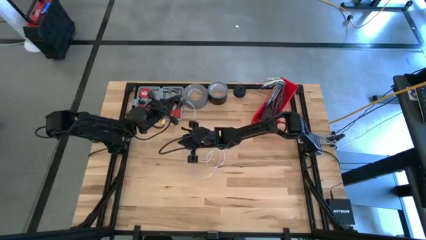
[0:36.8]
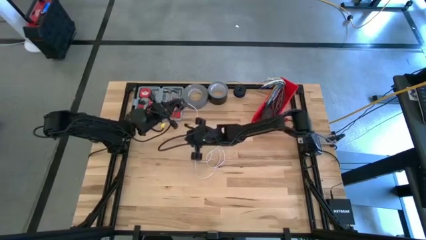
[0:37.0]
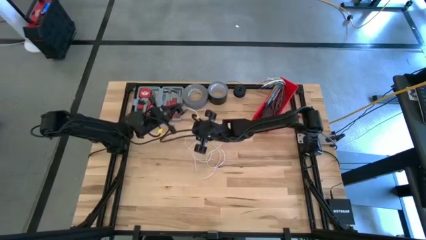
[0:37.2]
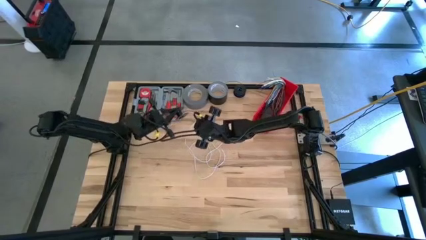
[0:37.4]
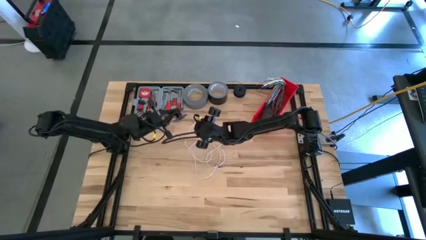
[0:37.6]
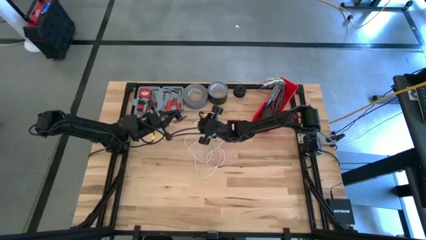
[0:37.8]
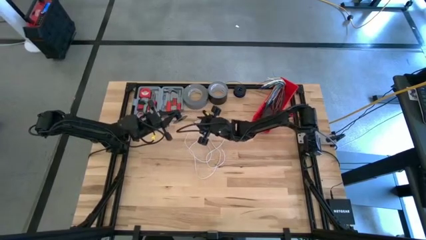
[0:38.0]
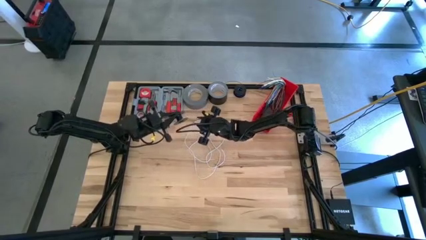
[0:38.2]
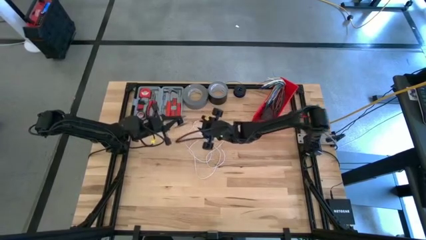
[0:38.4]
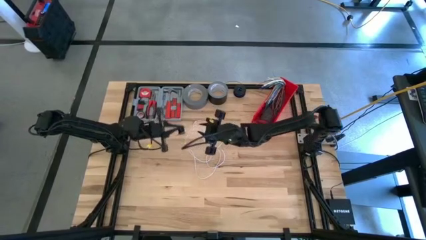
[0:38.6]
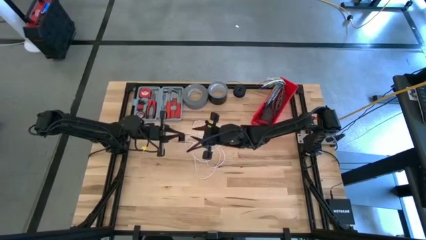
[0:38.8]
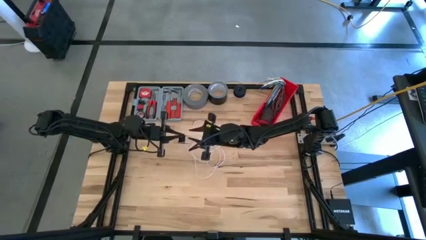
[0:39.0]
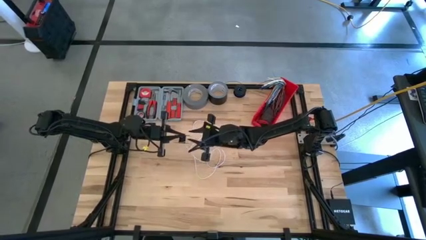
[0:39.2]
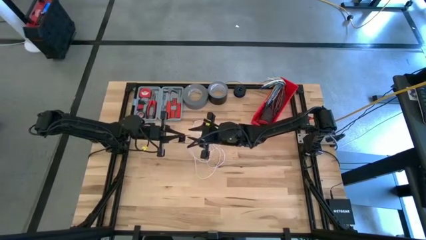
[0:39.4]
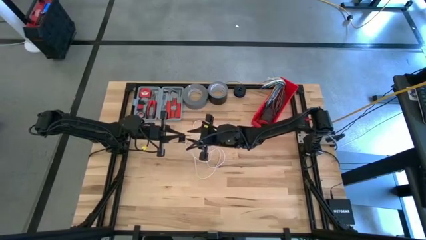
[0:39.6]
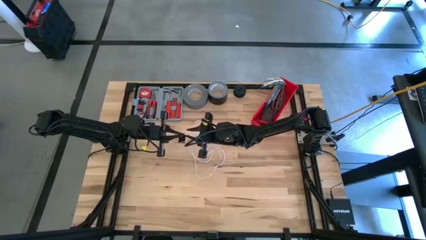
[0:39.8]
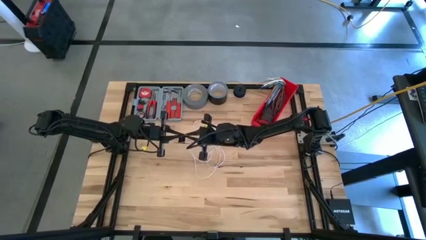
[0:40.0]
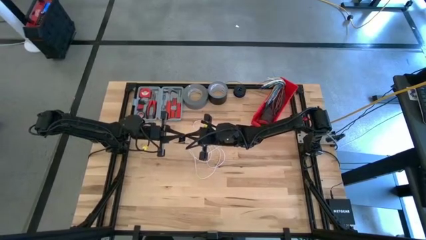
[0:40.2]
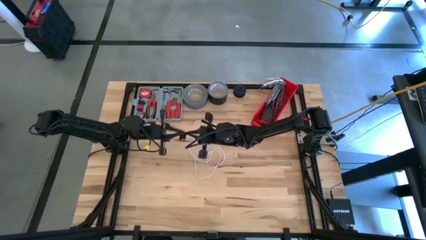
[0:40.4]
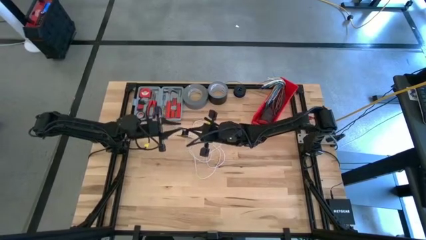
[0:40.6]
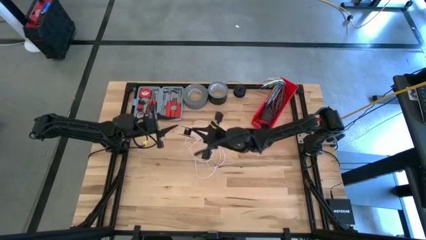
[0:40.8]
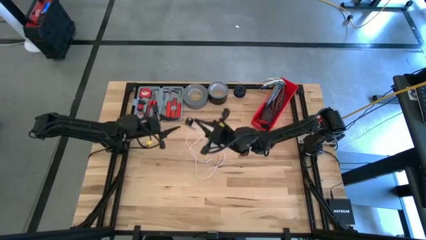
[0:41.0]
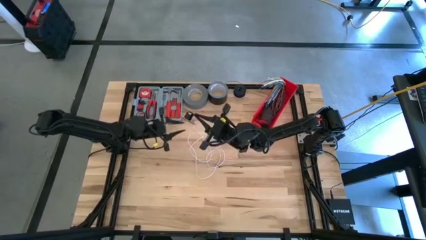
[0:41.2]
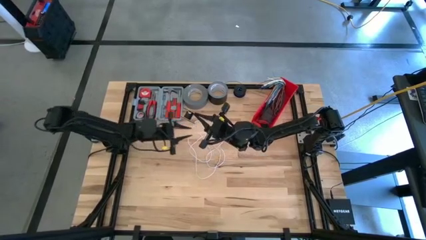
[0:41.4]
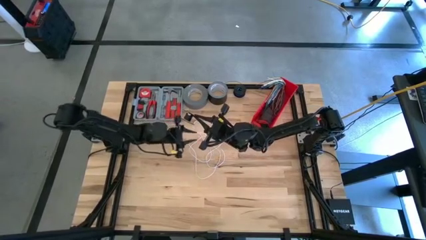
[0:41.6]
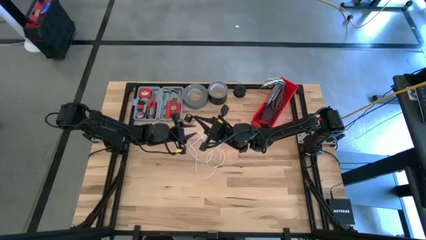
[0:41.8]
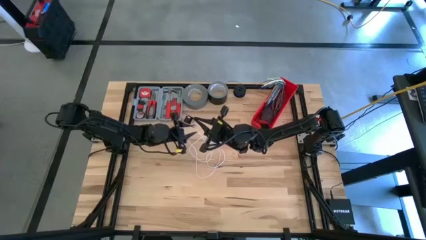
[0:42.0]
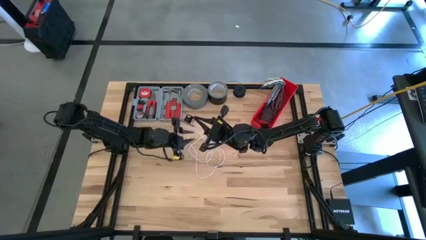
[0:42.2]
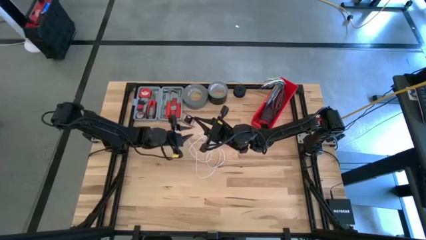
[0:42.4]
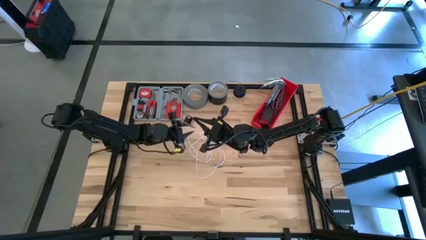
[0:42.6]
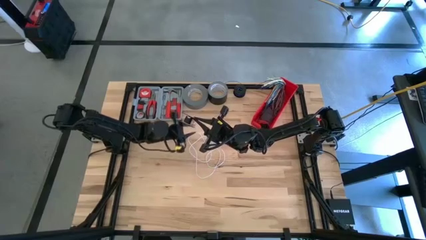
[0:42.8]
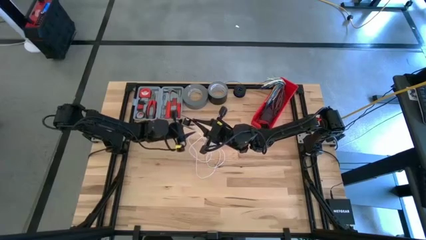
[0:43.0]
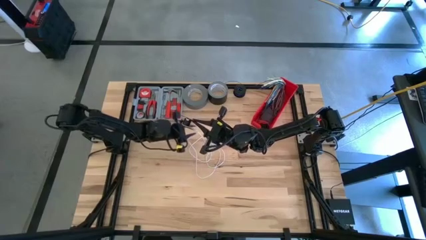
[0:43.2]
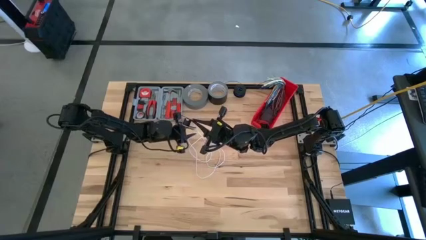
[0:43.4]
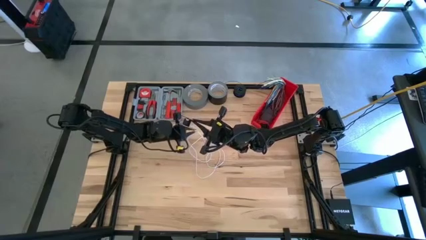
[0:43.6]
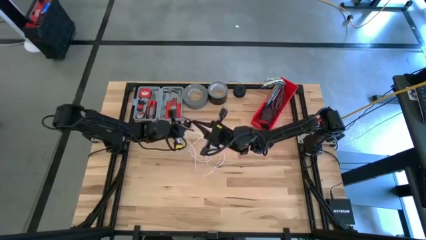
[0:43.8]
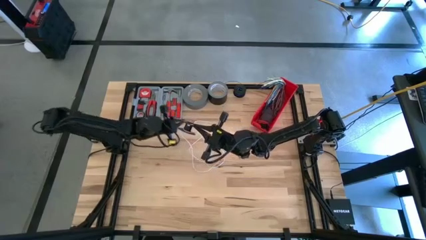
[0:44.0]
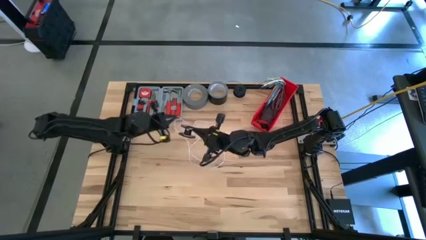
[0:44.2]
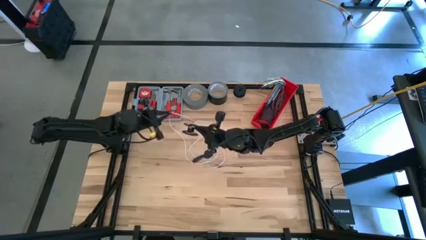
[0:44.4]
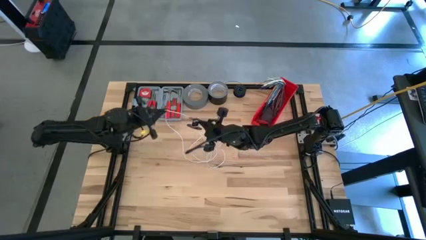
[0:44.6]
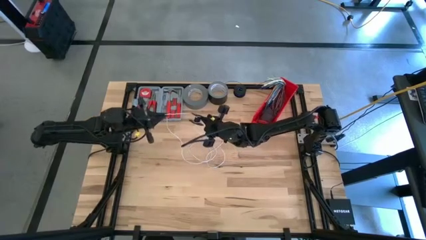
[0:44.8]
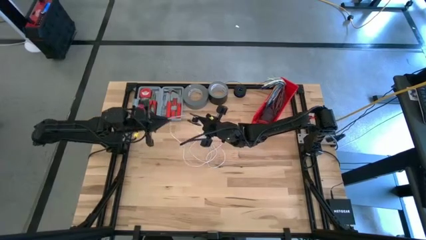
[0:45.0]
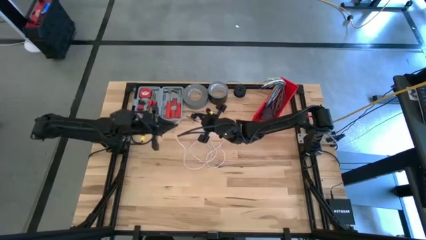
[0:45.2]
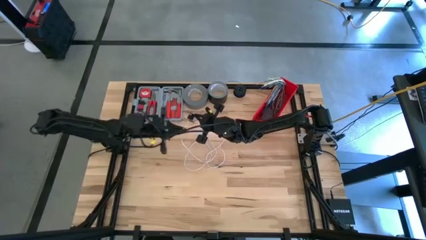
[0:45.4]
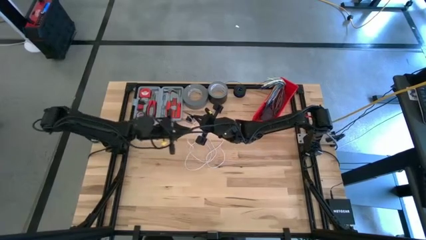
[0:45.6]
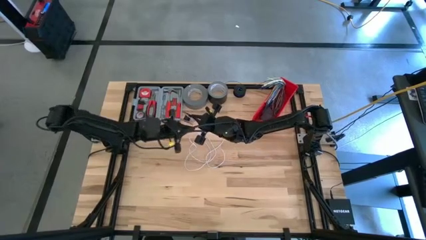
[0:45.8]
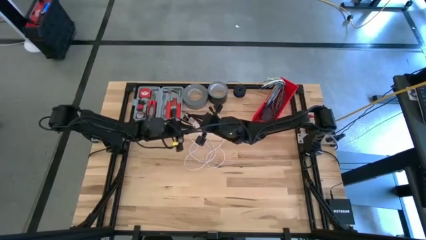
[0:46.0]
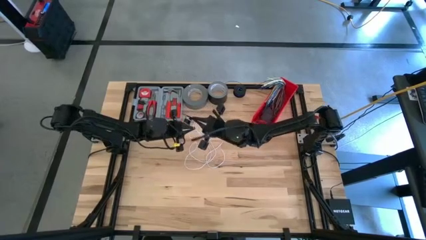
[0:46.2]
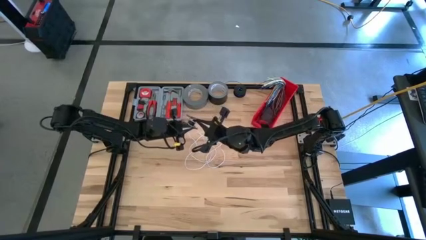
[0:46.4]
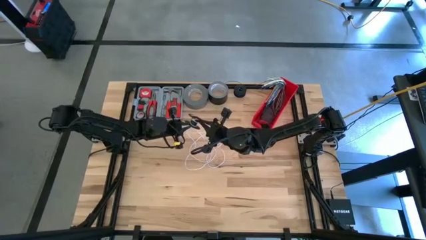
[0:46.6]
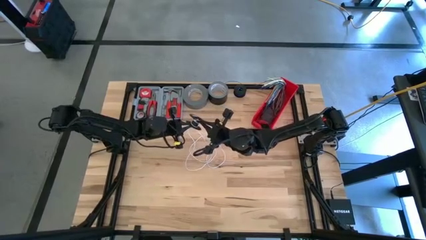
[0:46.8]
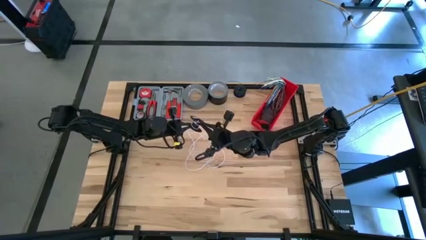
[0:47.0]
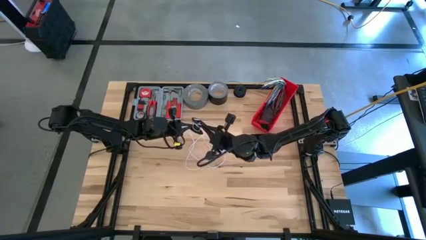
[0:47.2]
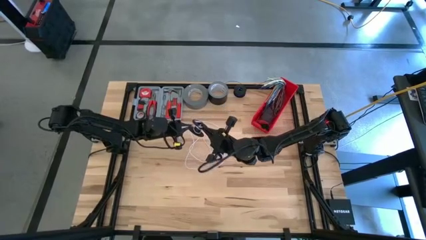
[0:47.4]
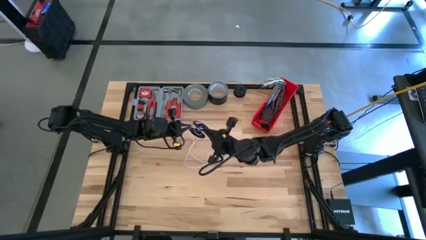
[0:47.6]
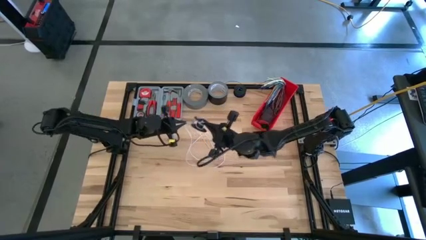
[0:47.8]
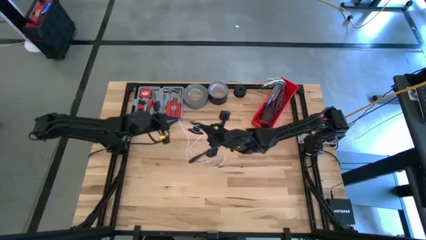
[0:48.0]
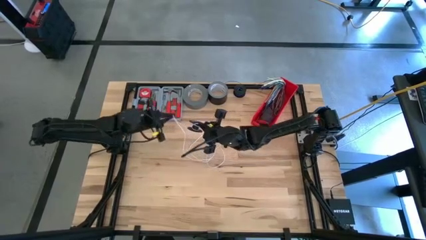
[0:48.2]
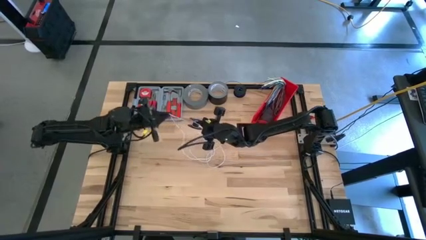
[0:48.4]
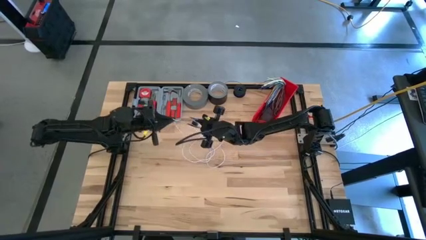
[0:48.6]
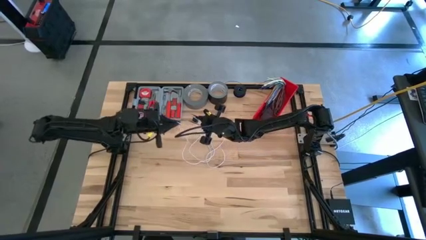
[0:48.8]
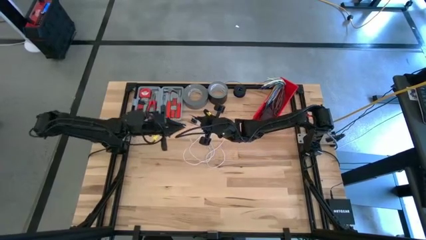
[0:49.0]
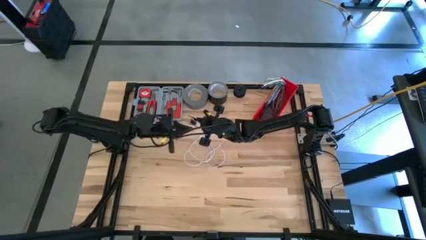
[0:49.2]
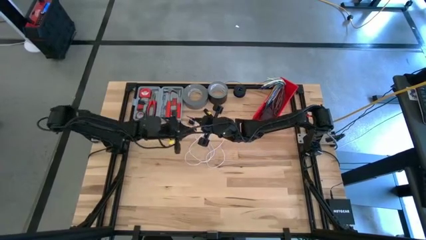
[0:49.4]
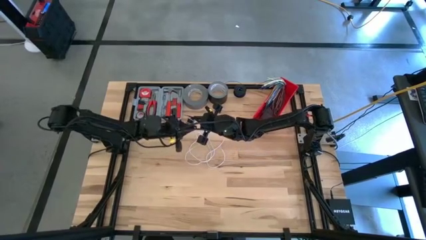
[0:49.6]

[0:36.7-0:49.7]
Task: Coil cords
Coil the white wire on the black spool
